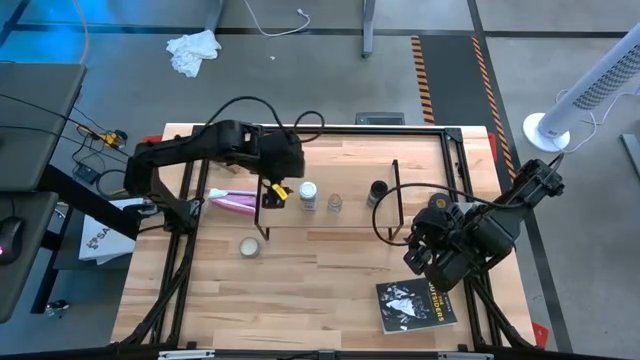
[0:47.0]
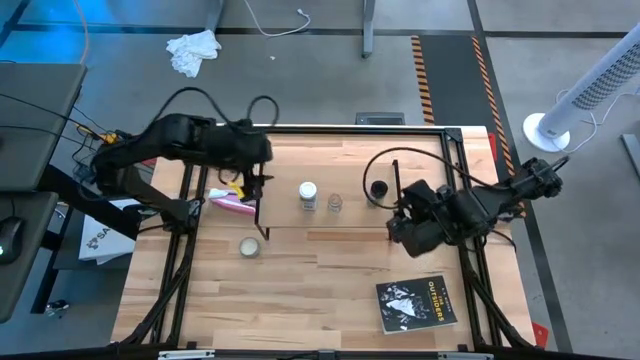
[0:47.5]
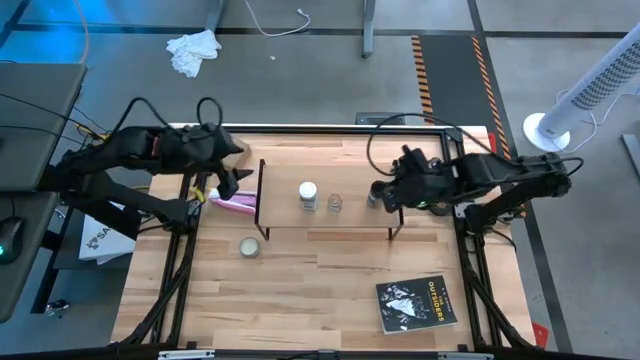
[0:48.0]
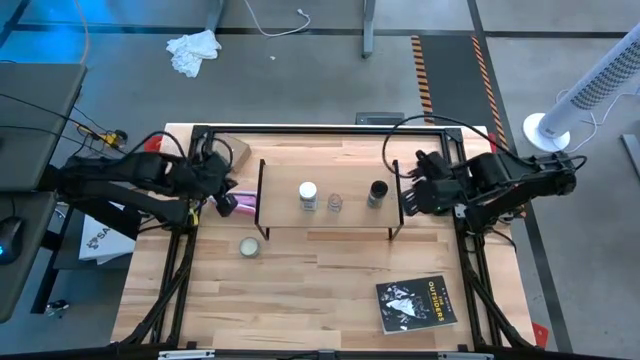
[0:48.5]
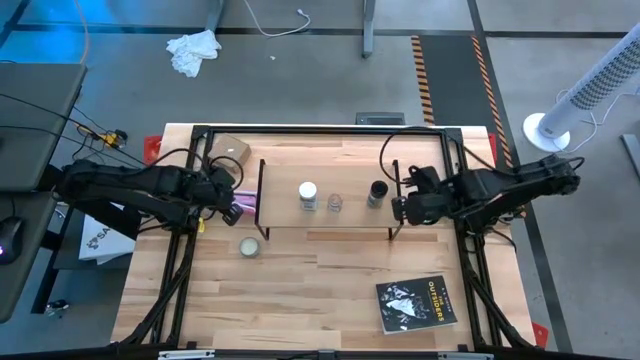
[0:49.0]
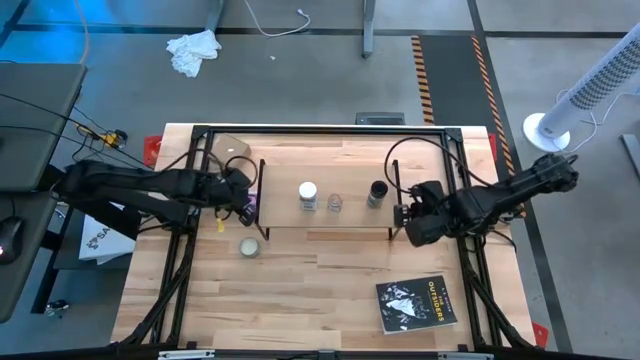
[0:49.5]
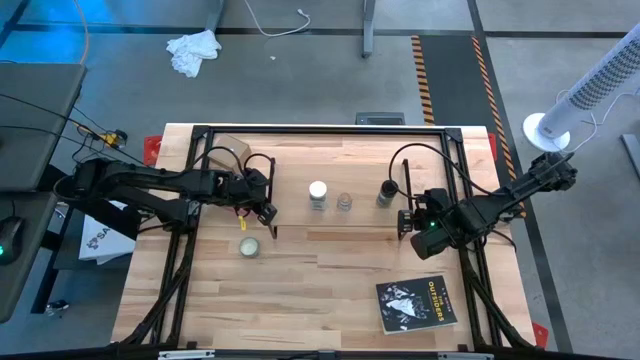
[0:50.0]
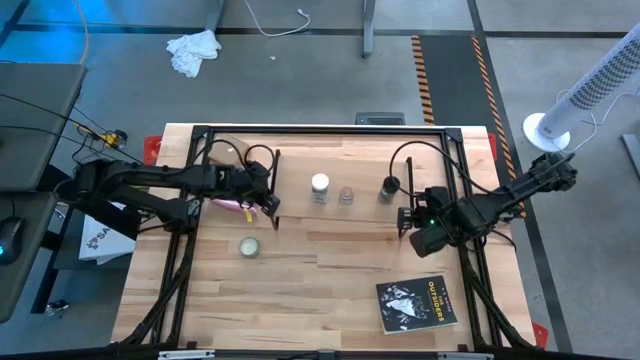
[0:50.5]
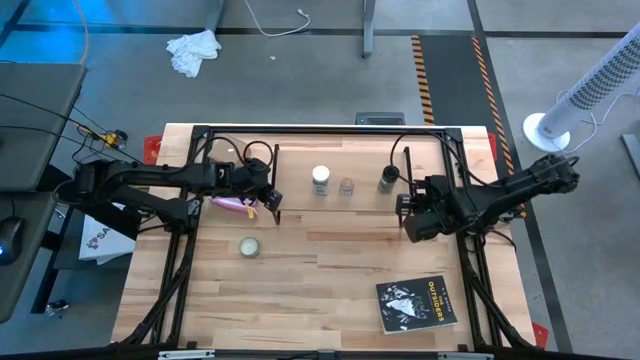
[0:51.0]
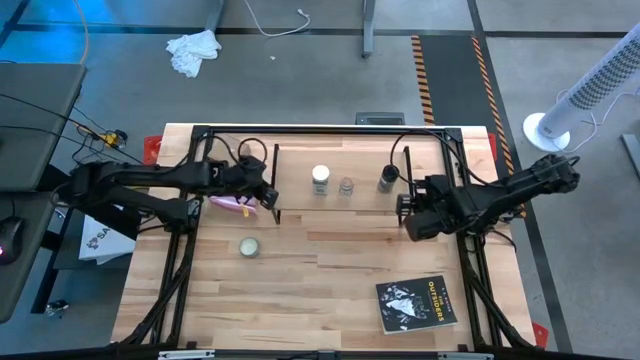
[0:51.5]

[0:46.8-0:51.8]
Task: Shelf spices
Adjust the shelf on the table

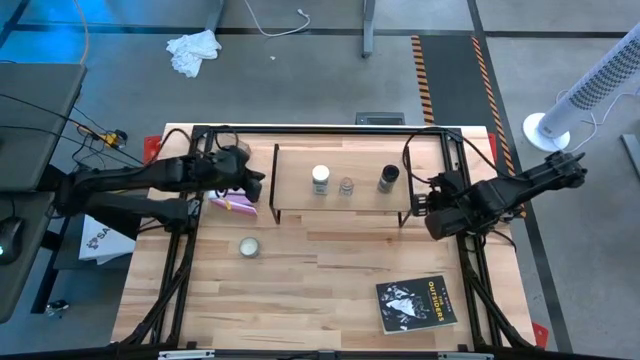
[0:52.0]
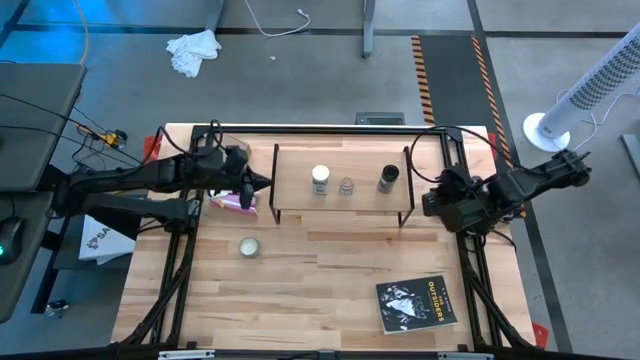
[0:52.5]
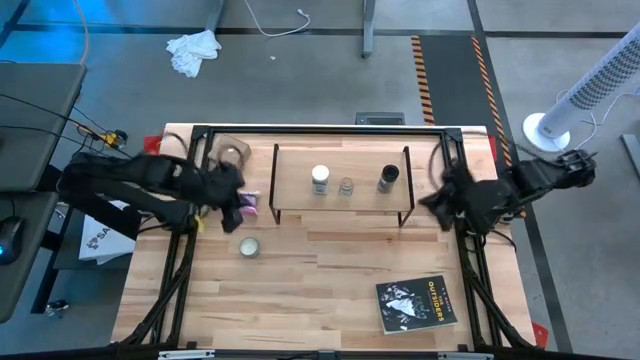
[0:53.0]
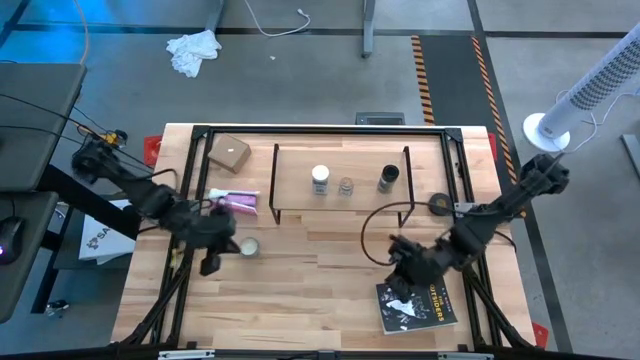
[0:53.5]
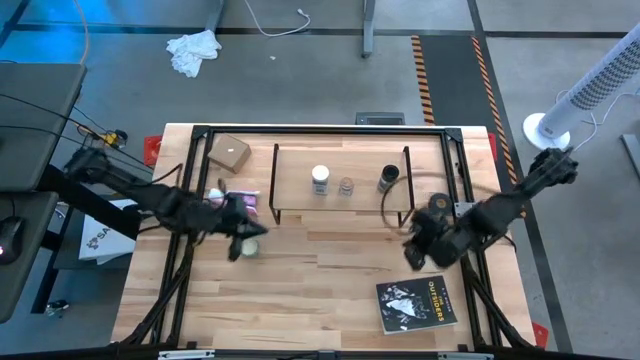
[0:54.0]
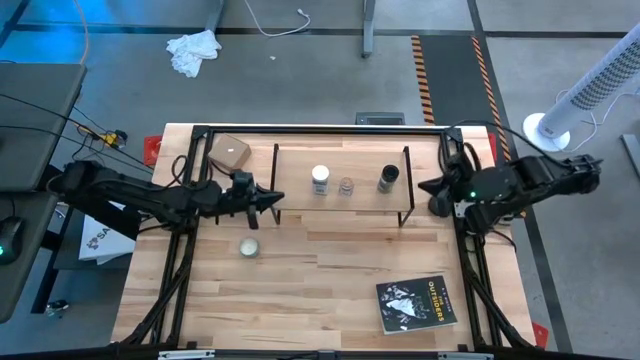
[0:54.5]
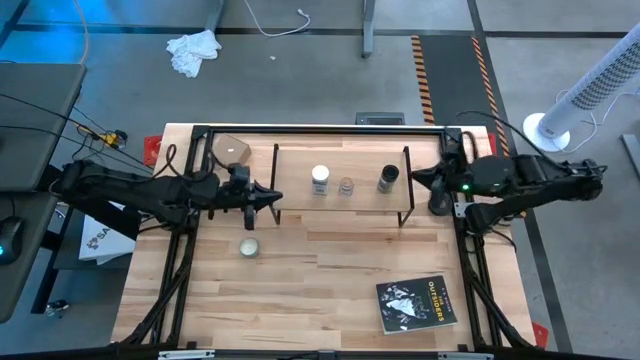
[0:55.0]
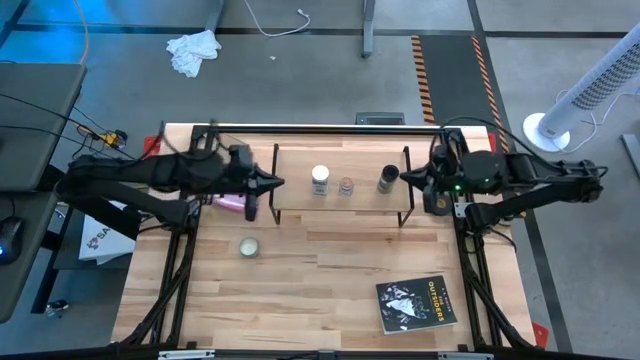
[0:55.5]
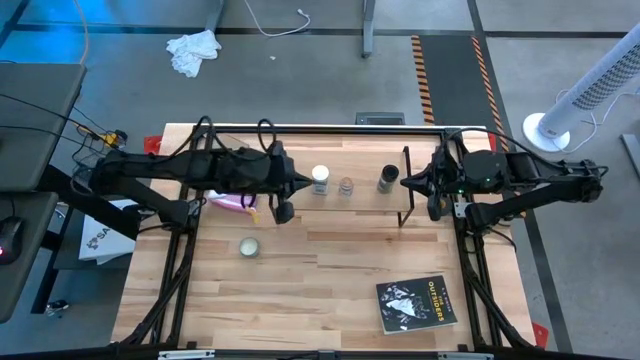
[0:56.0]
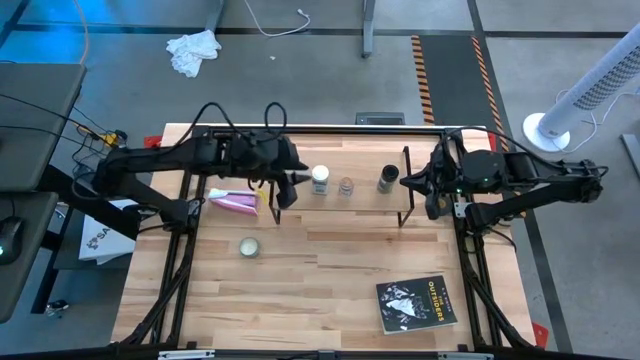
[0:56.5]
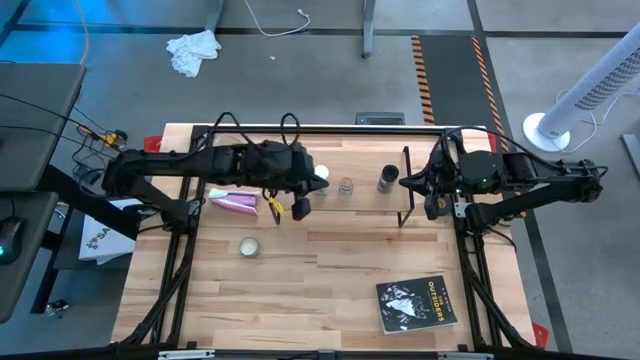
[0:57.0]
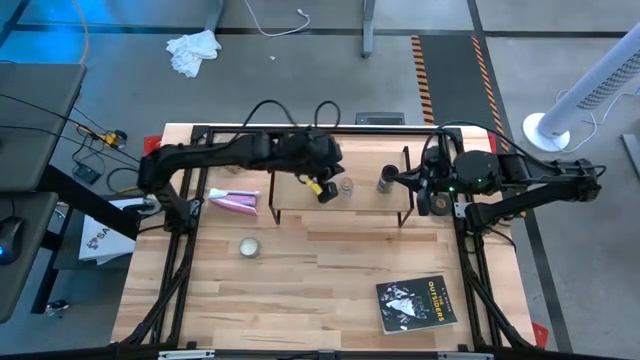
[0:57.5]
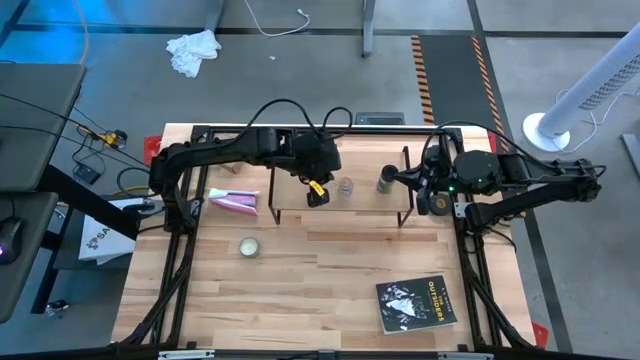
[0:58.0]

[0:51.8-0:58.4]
Adjust the white seasoning bottle on the shelf

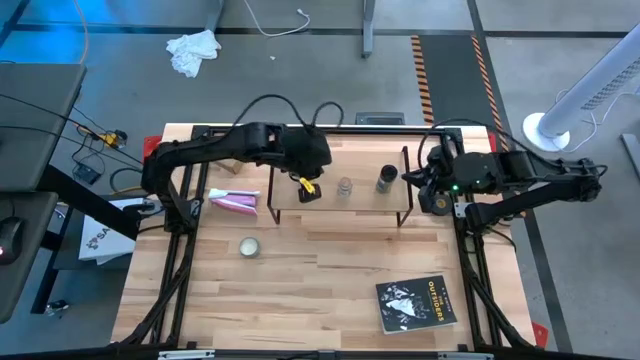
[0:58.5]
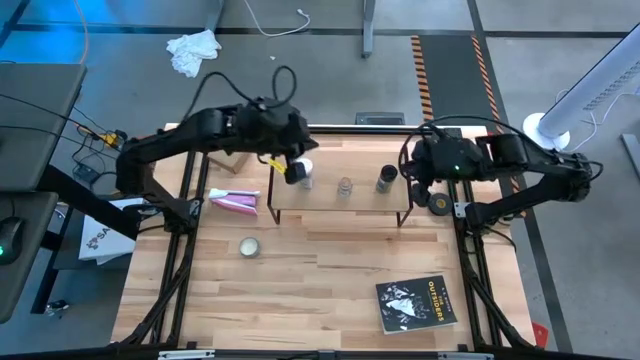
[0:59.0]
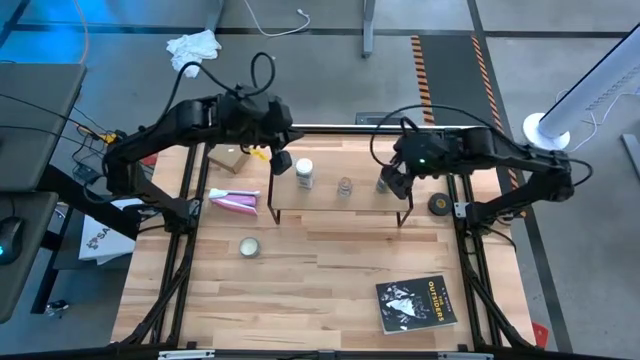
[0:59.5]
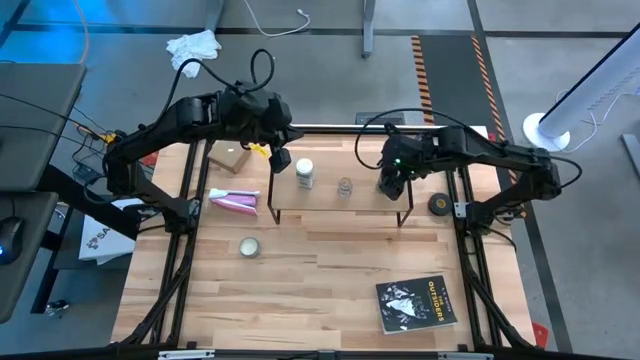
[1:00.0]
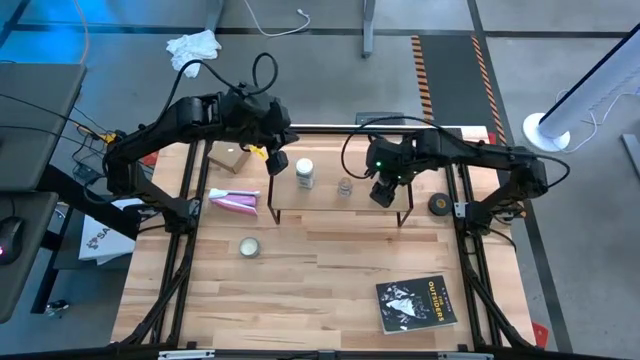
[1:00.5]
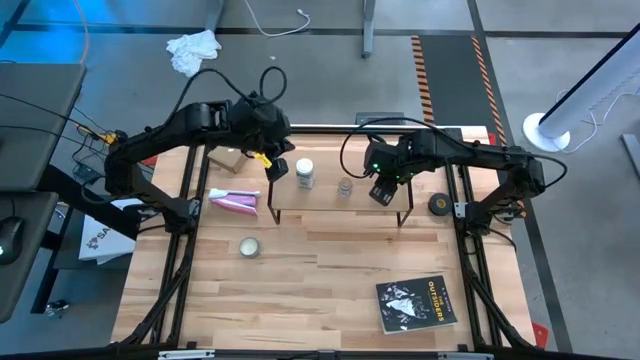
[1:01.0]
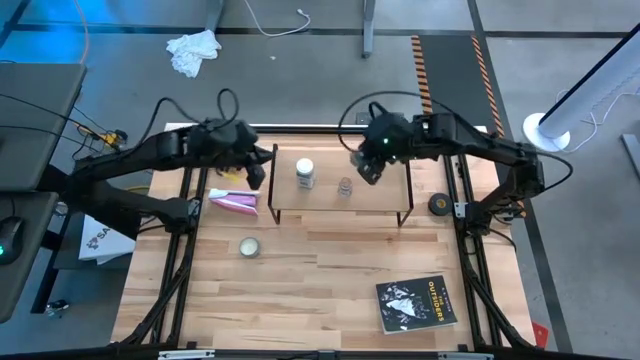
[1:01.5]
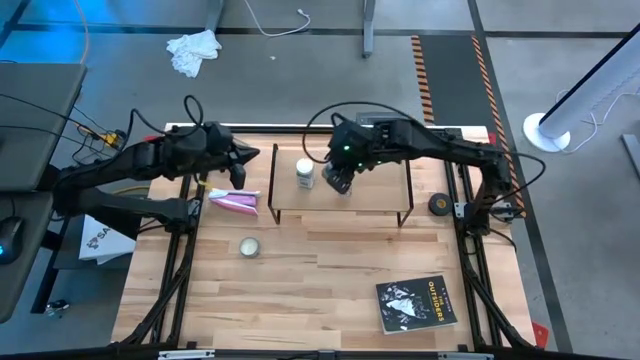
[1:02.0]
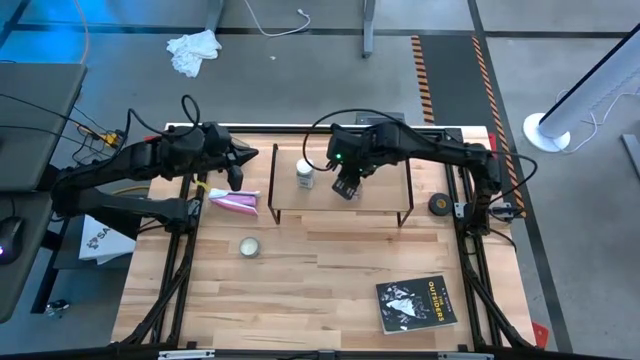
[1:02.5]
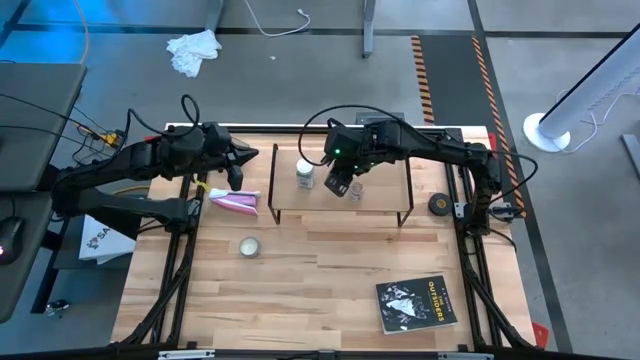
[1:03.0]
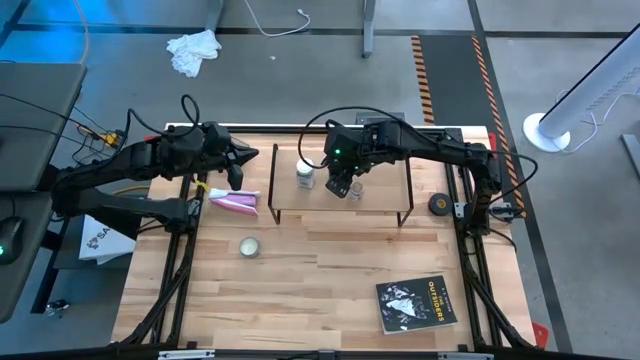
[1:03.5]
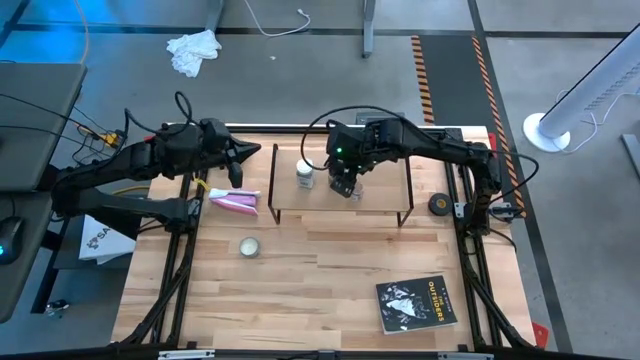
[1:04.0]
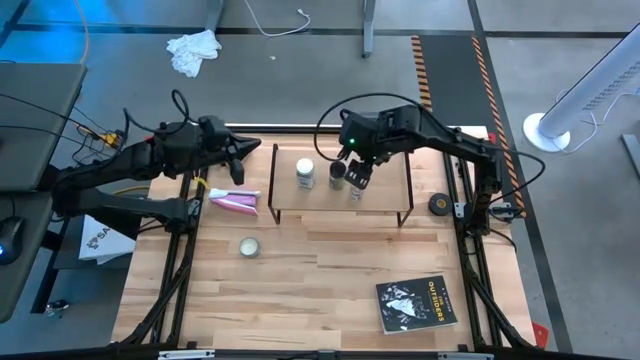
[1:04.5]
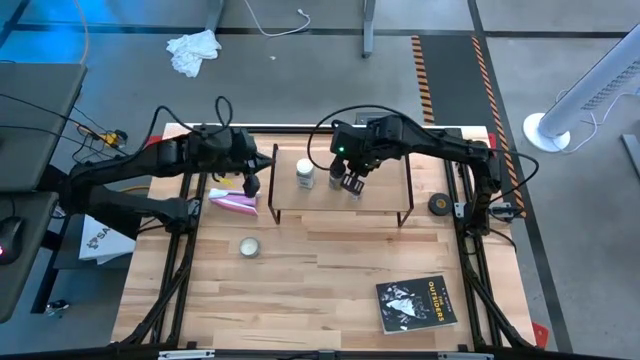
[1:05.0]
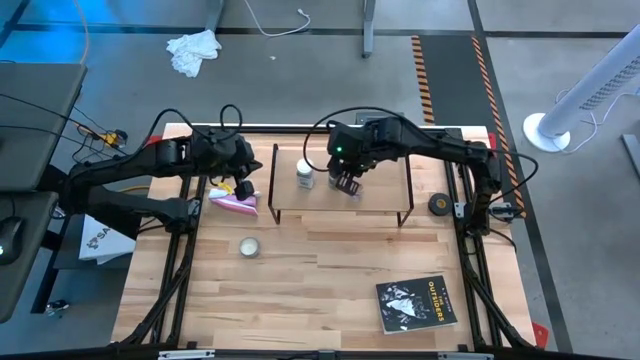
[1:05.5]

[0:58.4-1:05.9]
Adjust the light green seasoning bottle on the shelf

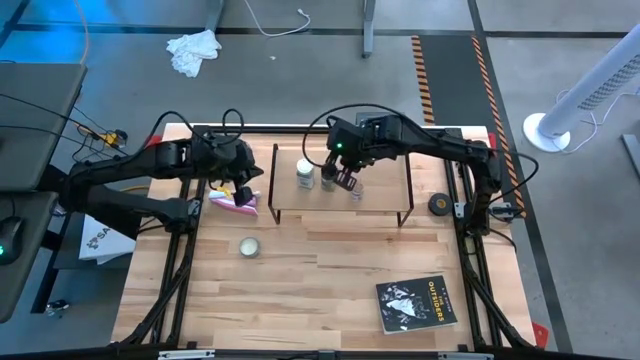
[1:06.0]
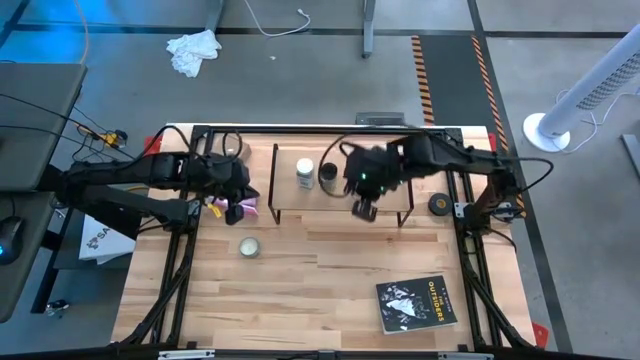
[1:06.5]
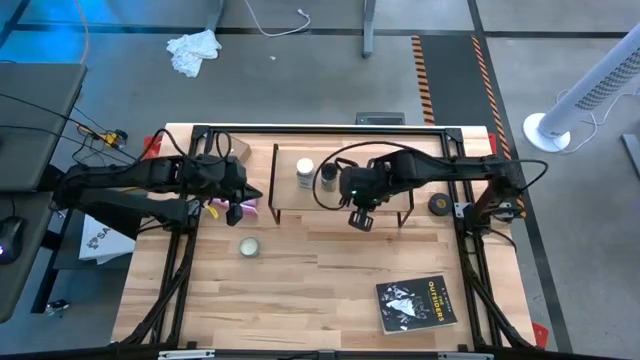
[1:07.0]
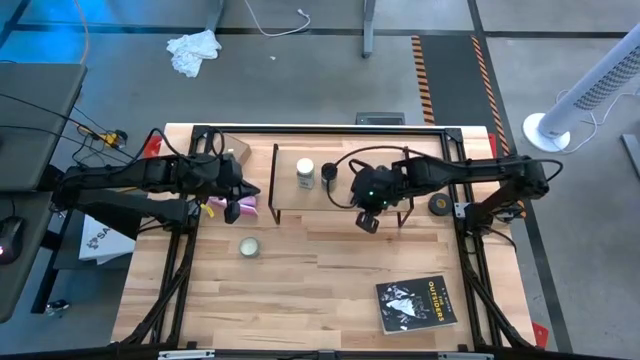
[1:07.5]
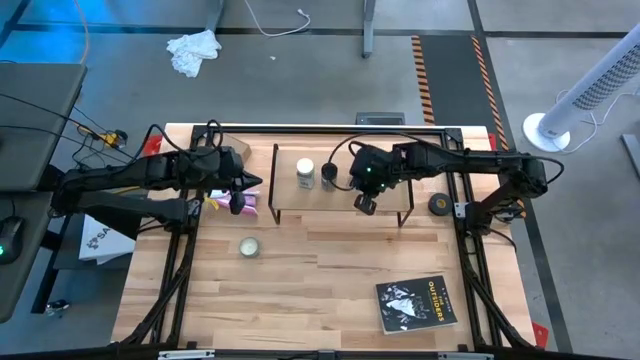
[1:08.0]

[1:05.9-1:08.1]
Adjust the brown seasoning bottle on the shelf
